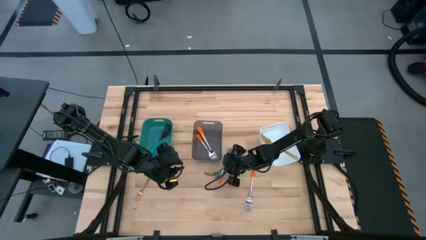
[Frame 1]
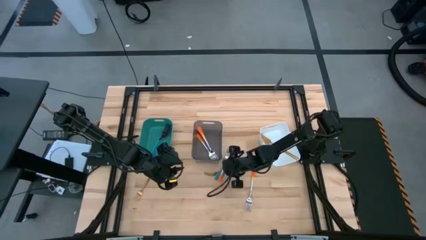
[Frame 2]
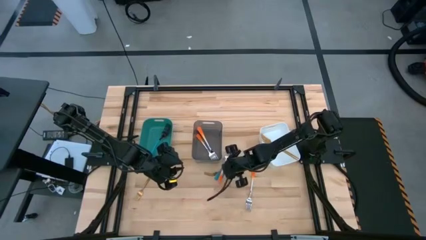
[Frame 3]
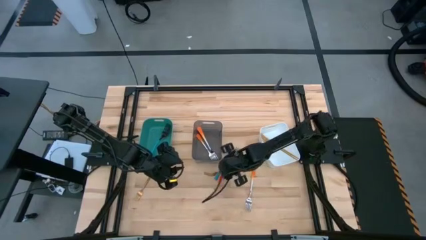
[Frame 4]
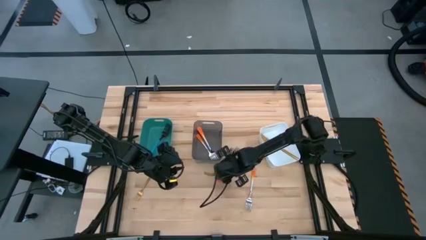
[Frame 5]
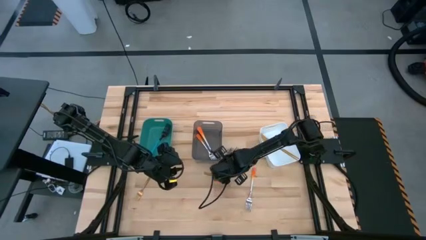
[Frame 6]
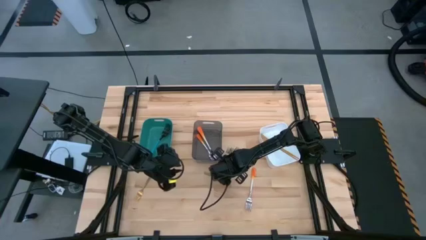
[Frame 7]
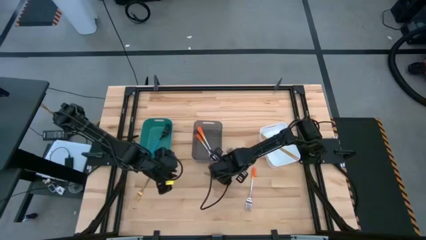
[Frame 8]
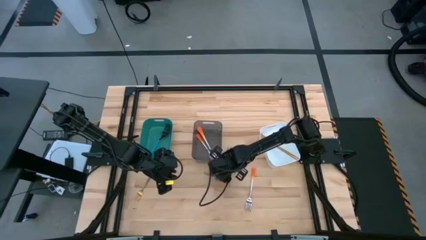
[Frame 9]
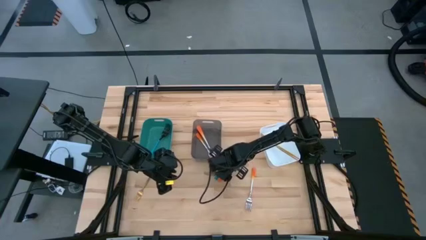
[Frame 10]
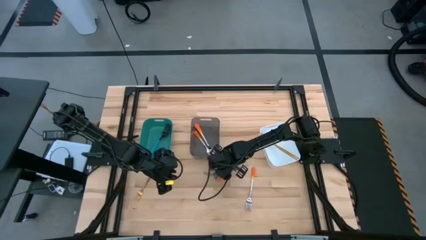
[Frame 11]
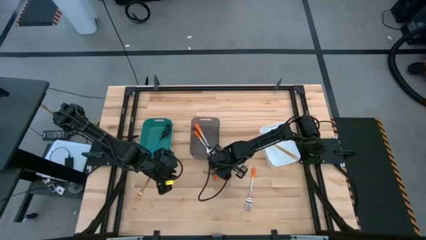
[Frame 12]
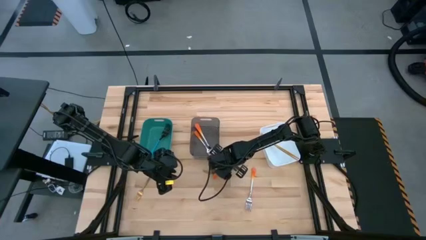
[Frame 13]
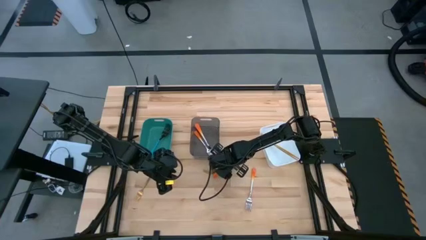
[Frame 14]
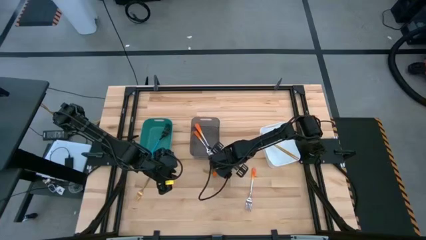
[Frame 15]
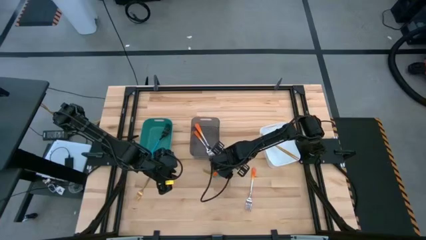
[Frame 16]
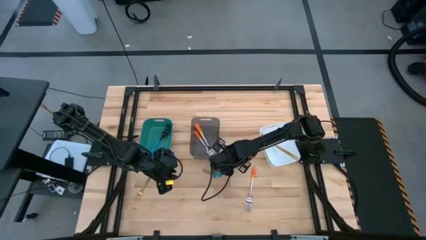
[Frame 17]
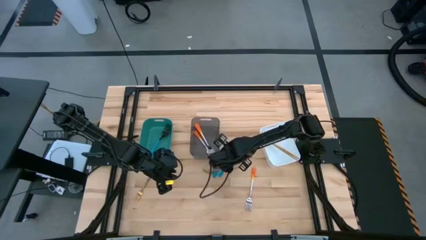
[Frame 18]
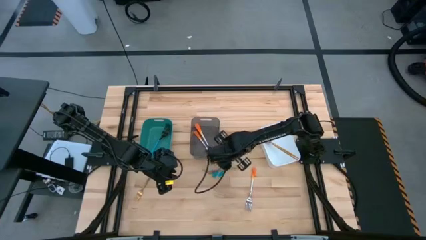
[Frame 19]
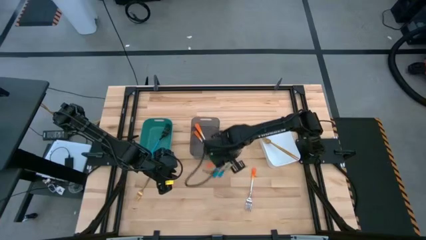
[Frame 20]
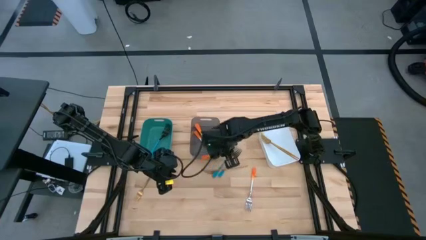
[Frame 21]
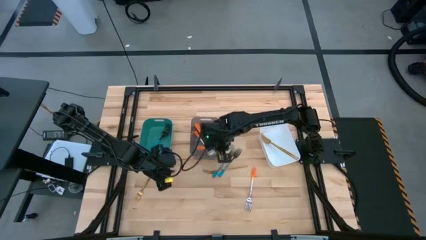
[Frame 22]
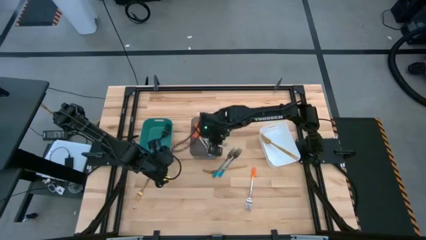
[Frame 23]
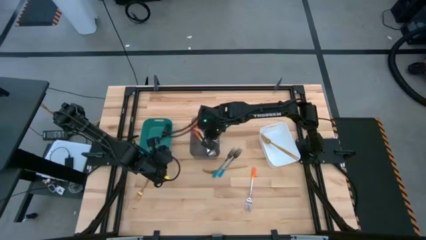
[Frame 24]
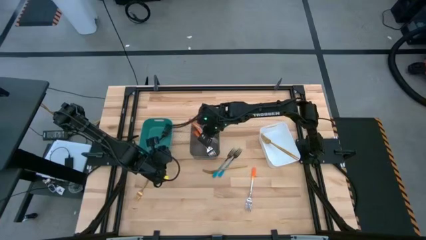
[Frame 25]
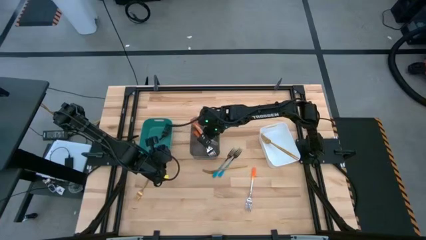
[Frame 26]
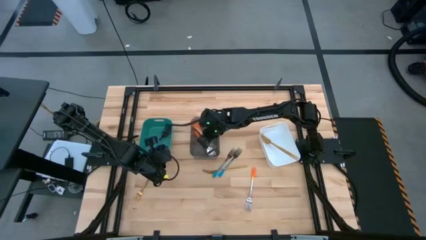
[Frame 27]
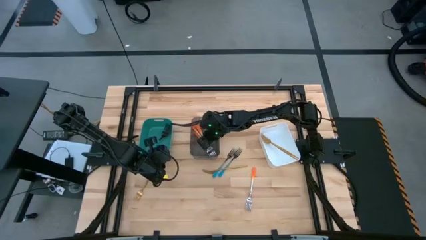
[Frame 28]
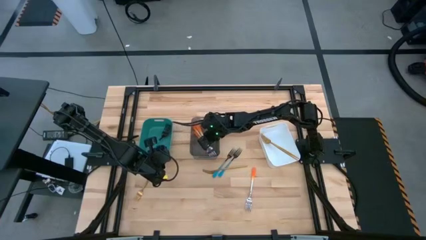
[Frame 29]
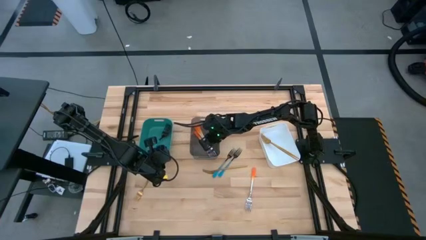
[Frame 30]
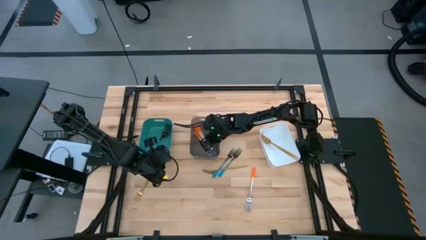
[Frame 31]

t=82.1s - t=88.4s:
Task: Sort silverware by color (type)
Put the orange fork into the black bin

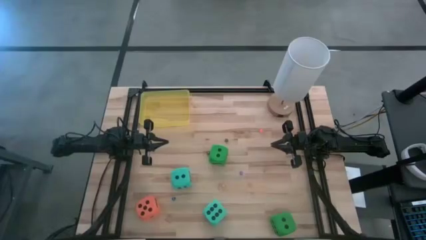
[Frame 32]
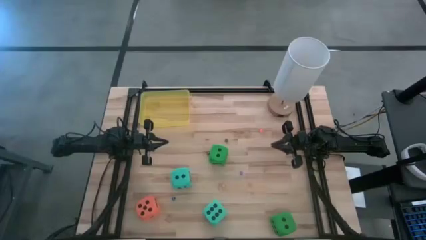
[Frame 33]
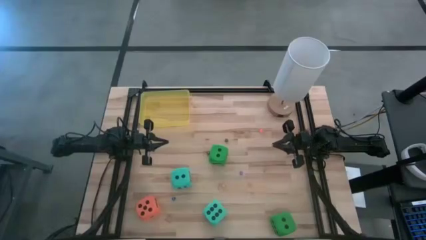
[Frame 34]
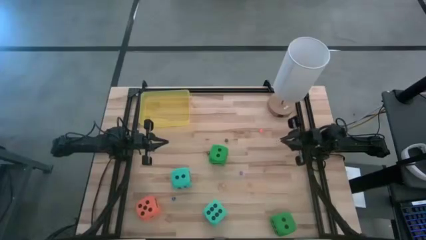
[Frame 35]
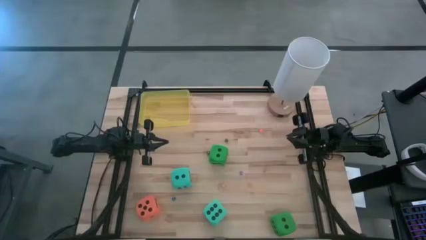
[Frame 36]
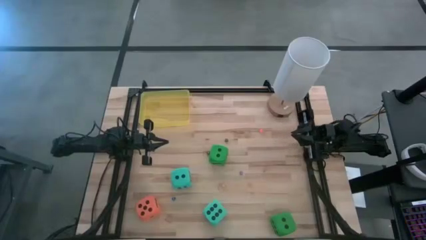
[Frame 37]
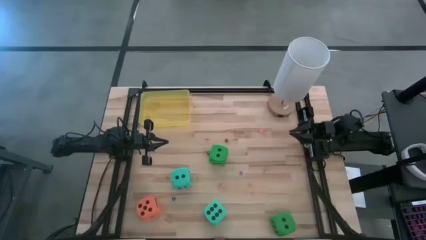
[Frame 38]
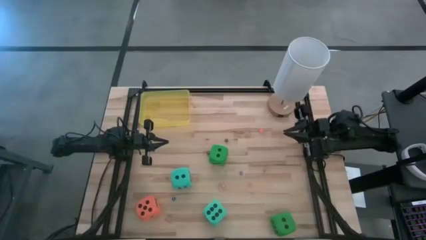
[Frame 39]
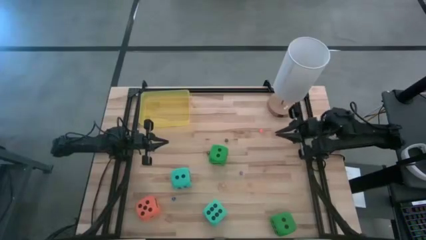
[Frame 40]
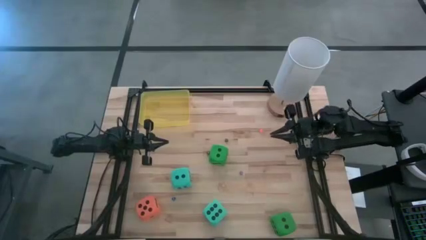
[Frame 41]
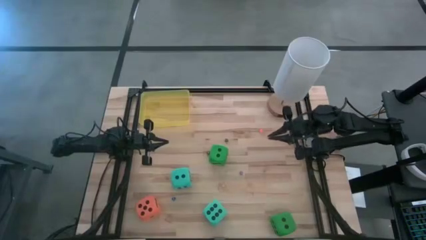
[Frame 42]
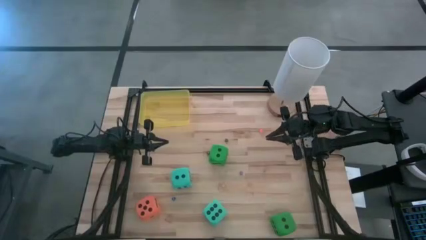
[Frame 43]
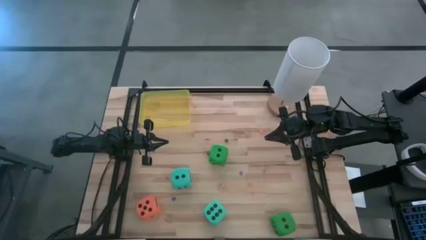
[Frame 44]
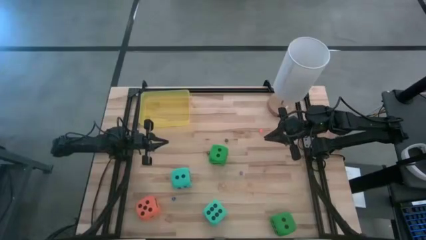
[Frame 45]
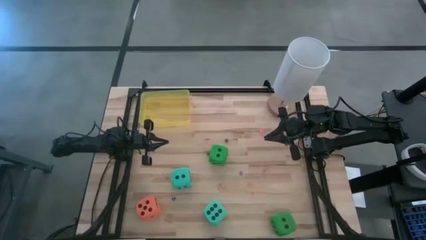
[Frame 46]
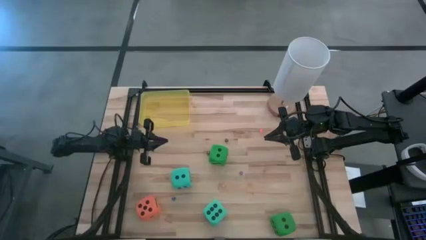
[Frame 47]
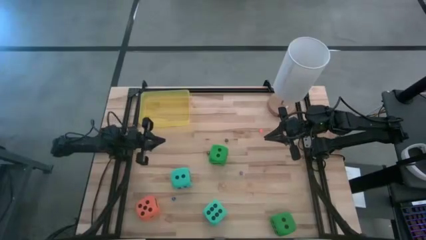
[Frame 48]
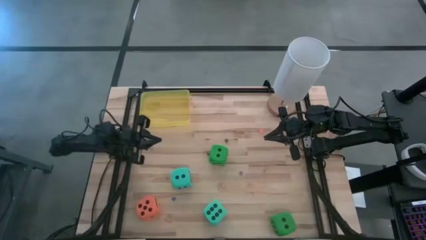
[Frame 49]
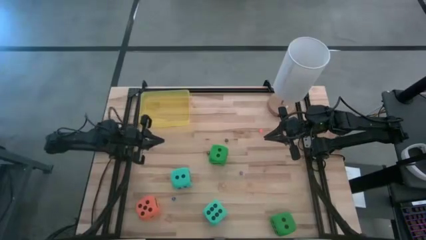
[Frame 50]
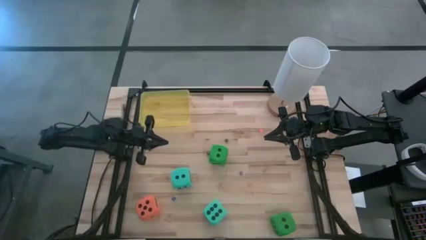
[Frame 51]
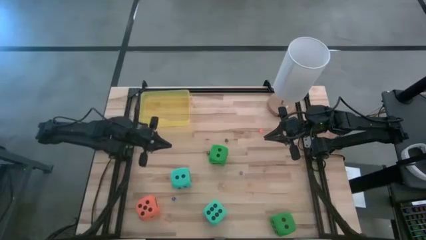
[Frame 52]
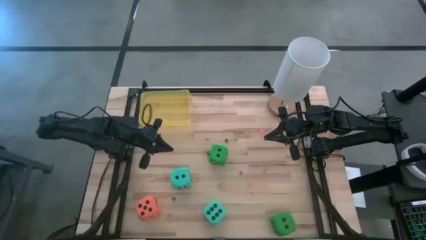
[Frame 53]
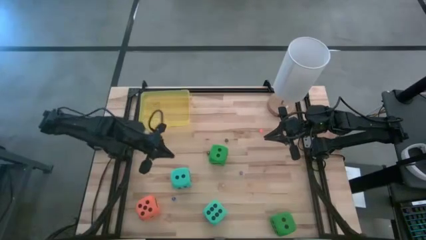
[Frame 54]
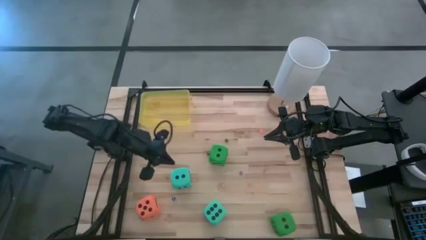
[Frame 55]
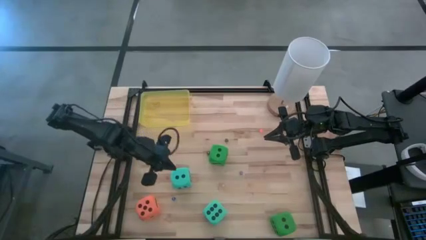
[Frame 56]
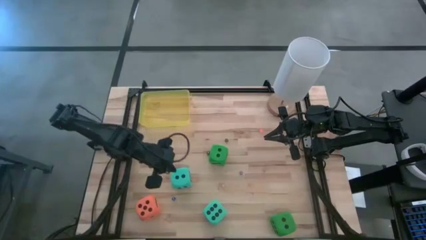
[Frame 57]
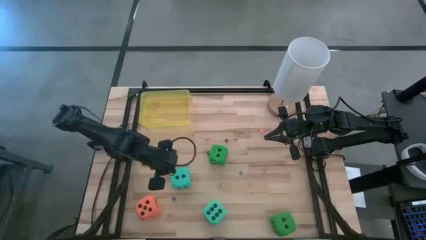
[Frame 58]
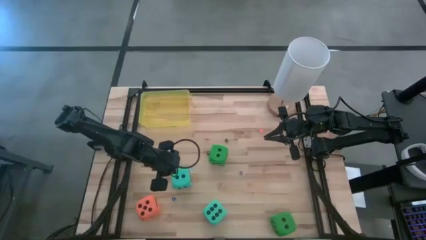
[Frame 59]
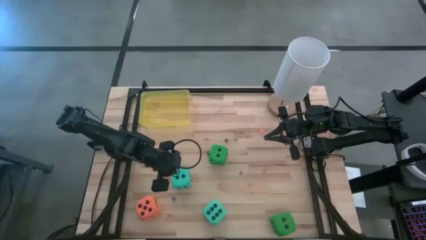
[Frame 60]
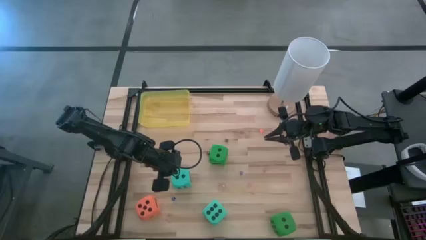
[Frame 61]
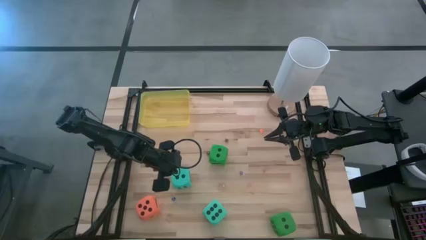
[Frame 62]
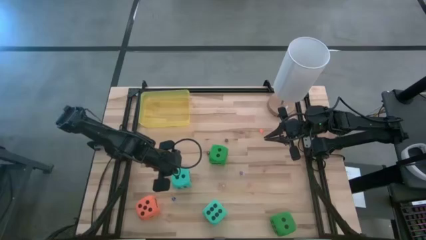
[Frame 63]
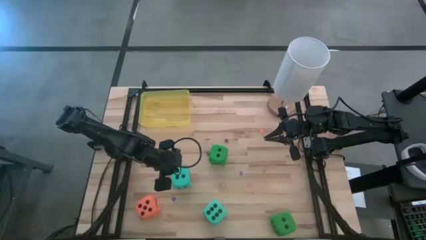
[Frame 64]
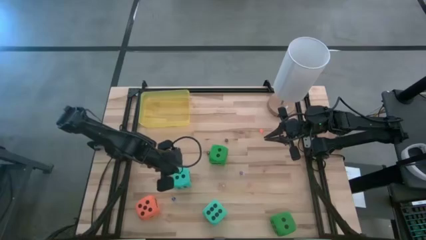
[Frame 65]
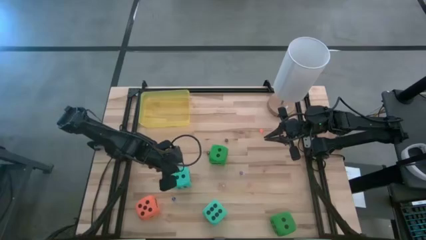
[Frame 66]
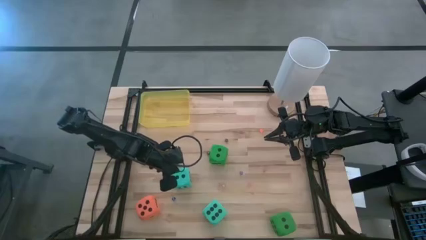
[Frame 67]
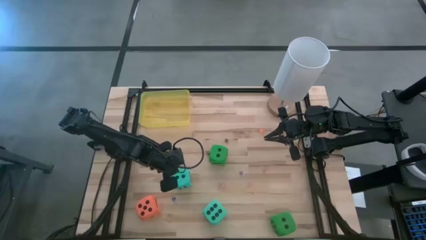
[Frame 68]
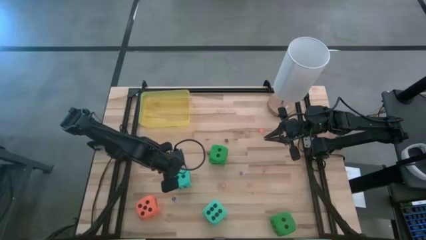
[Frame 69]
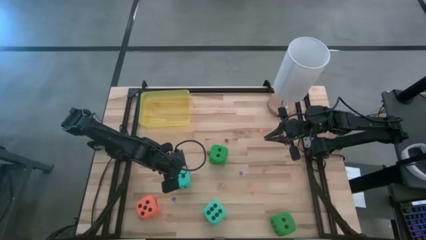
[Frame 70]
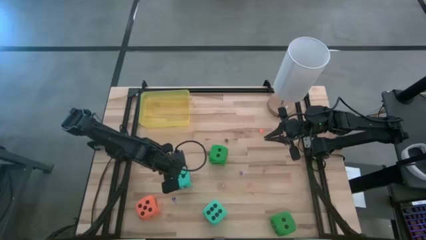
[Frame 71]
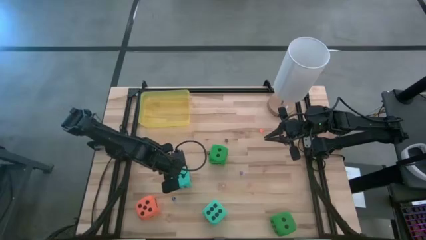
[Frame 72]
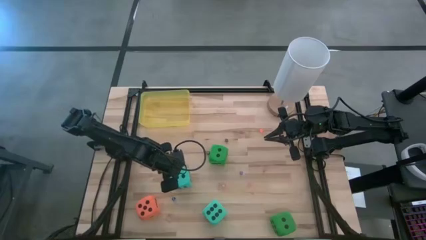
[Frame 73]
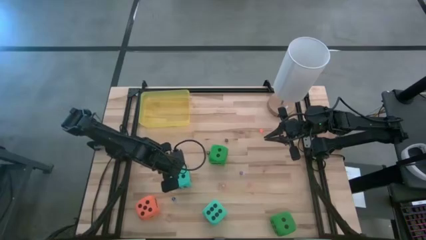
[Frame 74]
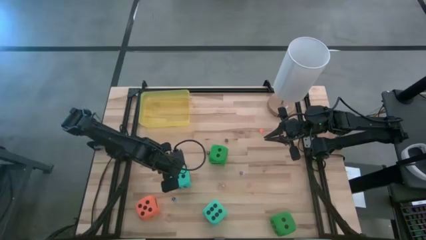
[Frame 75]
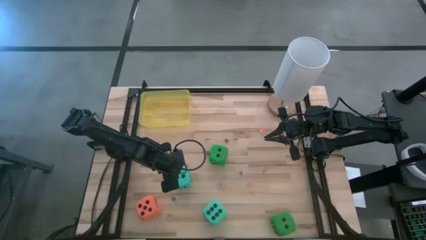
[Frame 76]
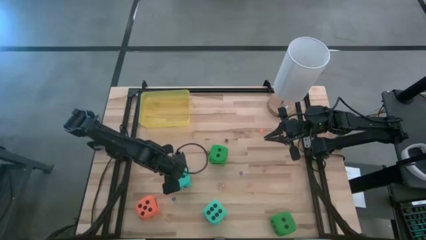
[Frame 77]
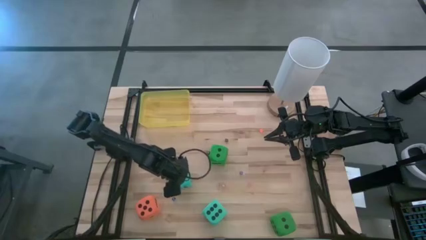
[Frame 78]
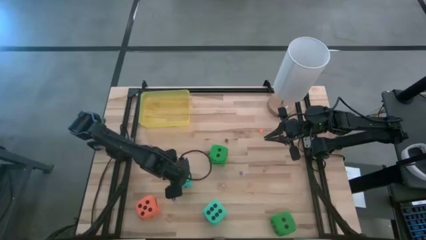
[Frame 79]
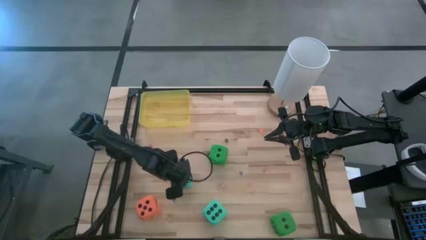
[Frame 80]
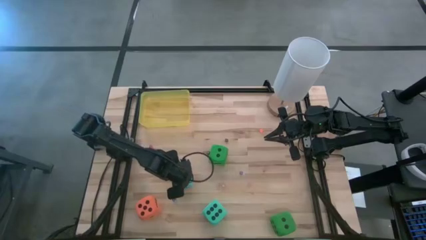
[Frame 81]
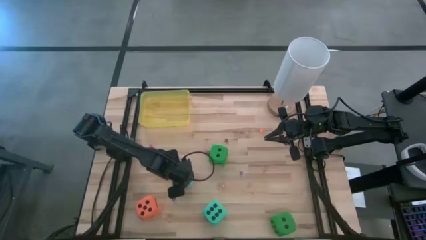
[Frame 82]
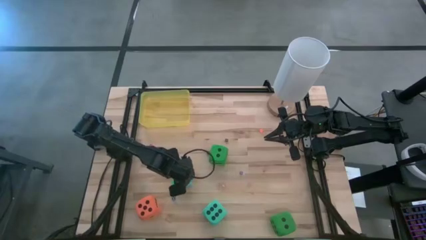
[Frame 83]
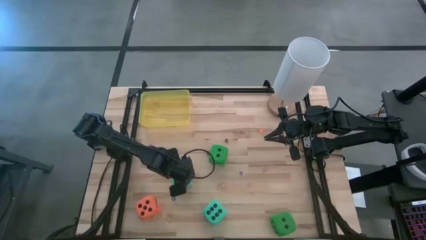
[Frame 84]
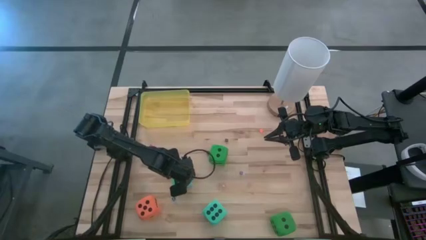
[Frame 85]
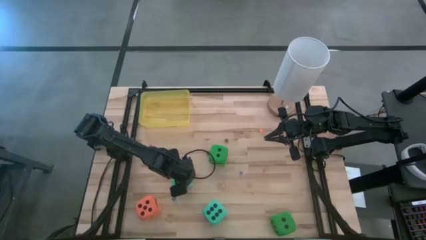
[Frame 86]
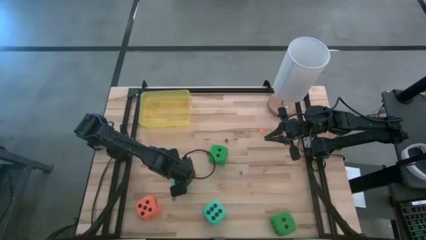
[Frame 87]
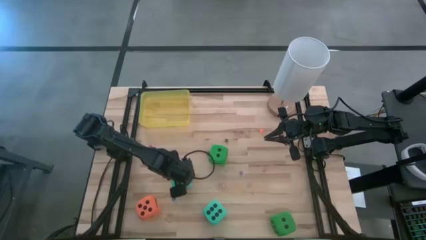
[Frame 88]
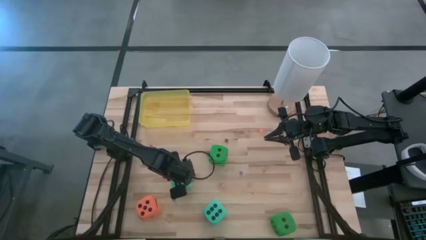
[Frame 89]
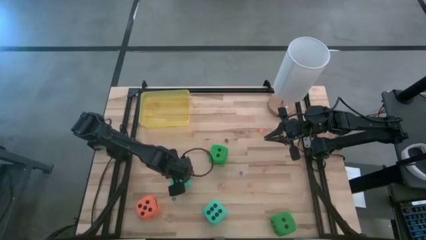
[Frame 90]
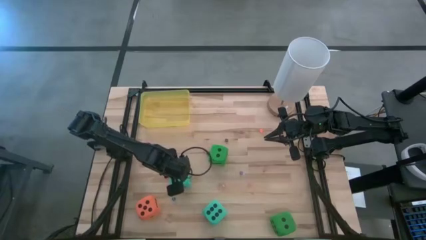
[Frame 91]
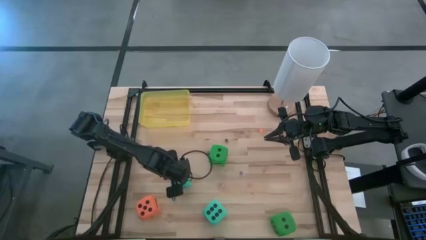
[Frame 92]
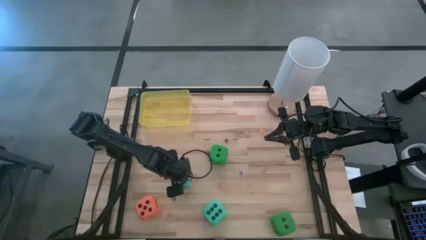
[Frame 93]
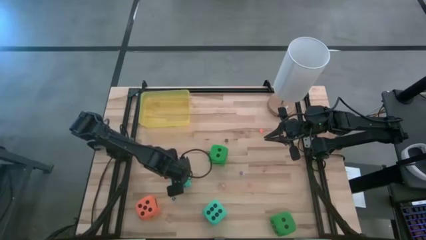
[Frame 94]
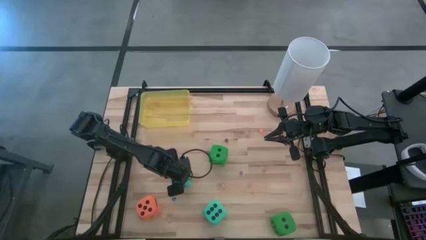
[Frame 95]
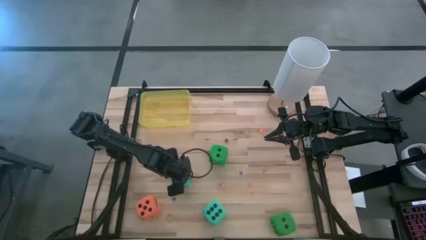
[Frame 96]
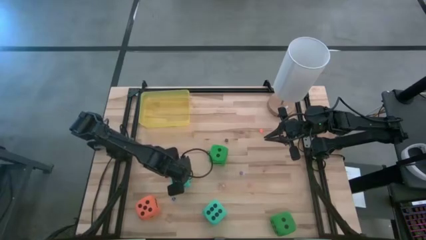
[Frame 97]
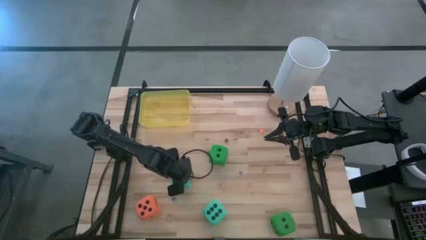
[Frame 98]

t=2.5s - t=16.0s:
Task: Pick & Place Dice
Put the top blue large die into the yellow container
